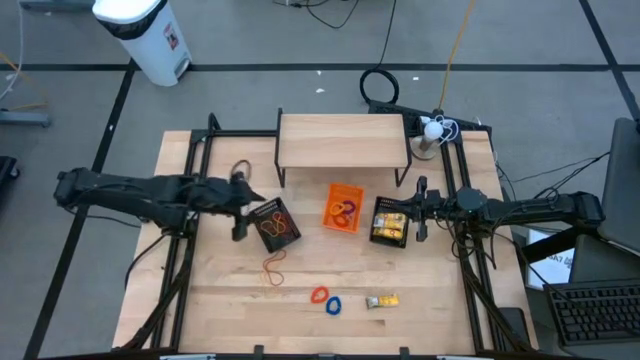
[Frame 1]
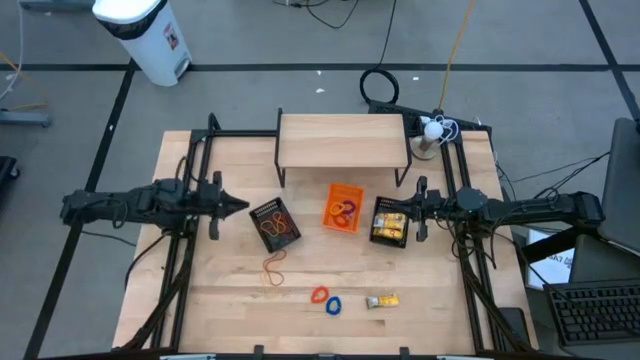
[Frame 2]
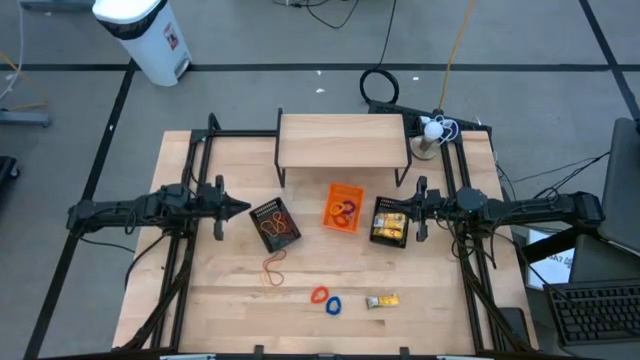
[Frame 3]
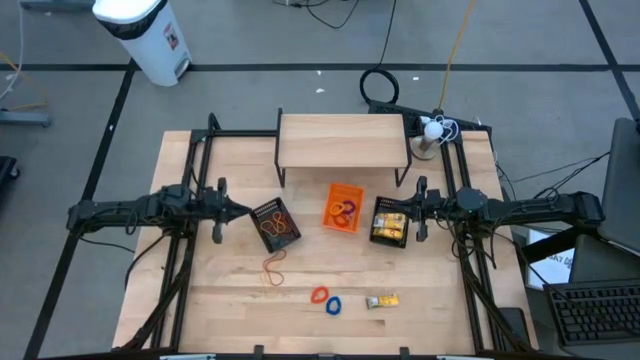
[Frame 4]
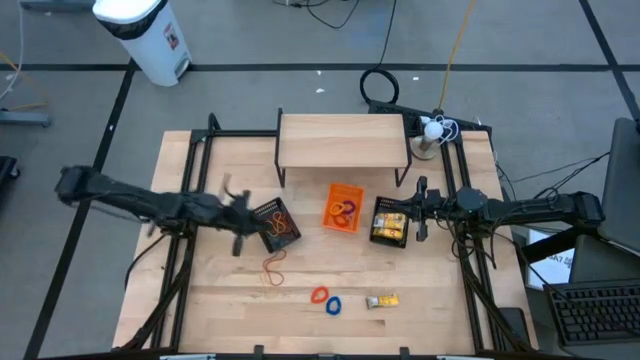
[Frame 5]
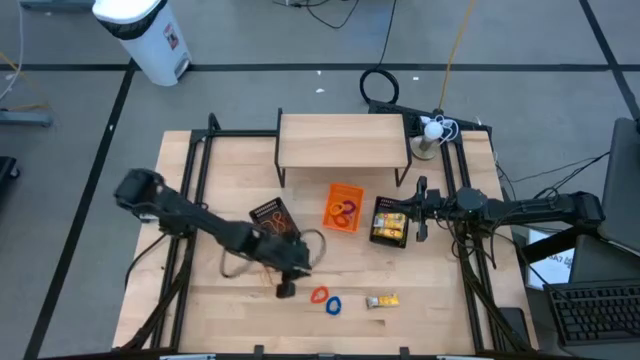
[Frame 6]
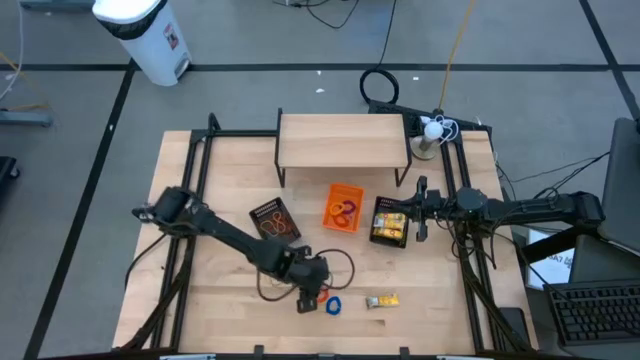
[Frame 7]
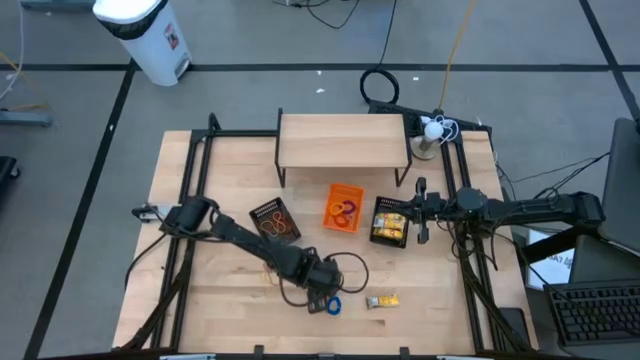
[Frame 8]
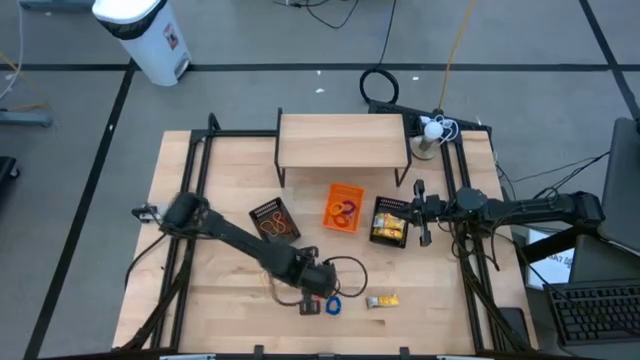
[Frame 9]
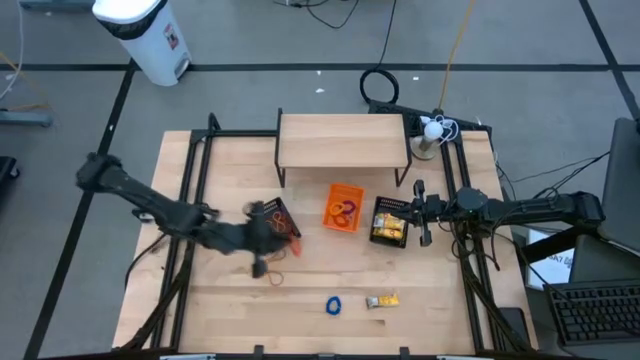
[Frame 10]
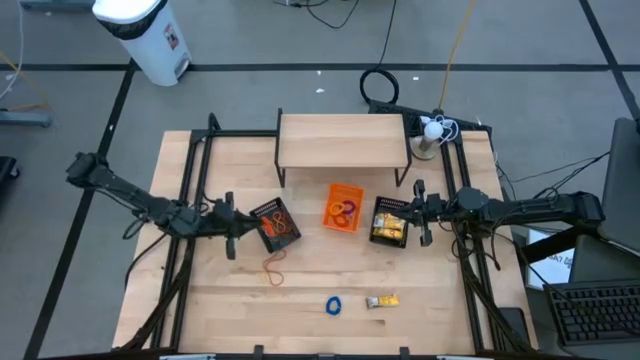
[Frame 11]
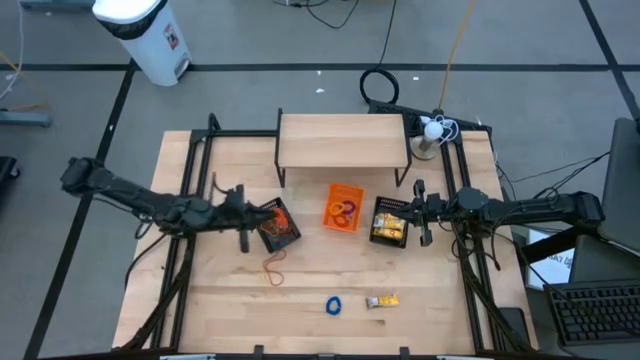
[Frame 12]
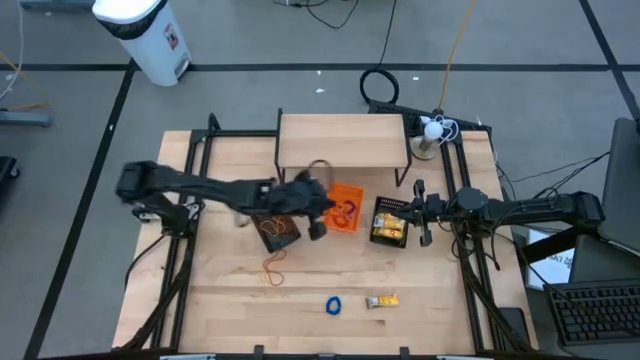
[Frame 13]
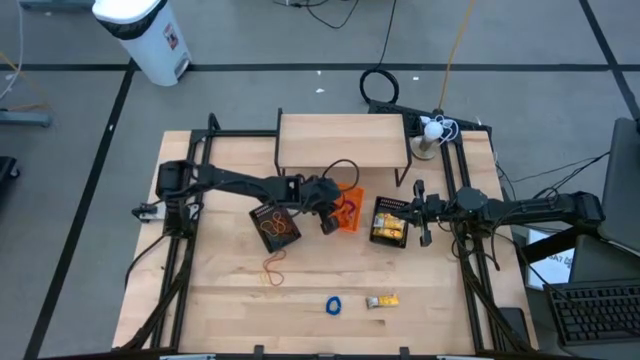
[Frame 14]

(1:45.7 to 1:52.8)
Task: Pick & Place Office Desk Supplies
Put the orange spring keychain into the orange bin

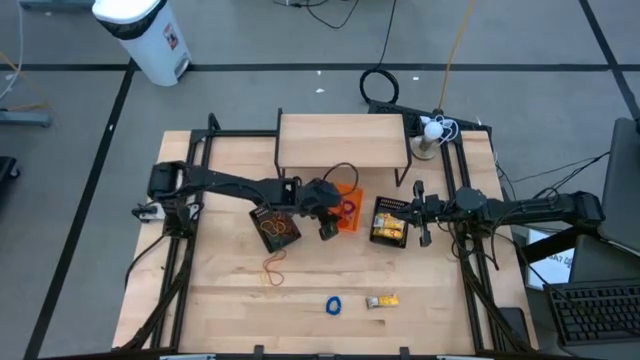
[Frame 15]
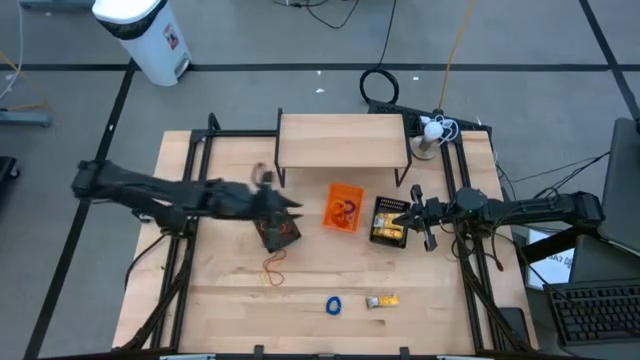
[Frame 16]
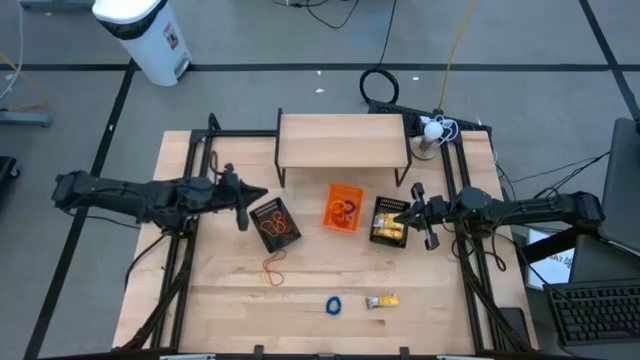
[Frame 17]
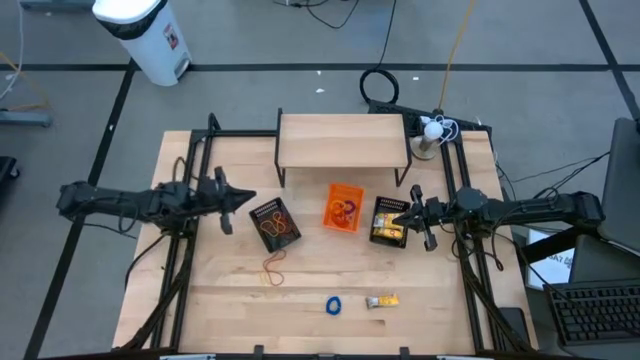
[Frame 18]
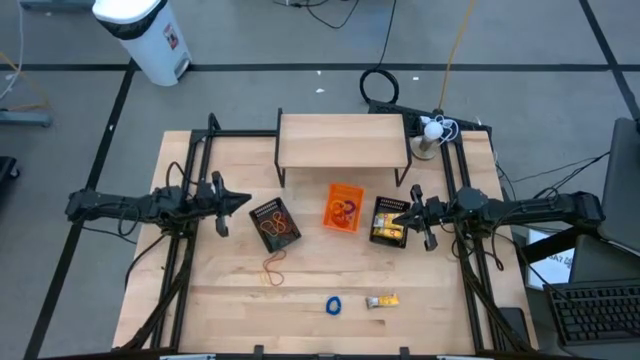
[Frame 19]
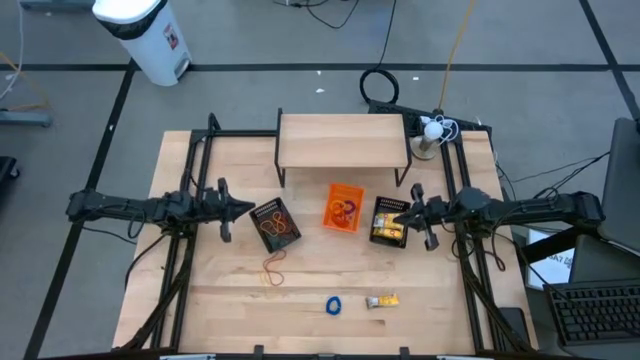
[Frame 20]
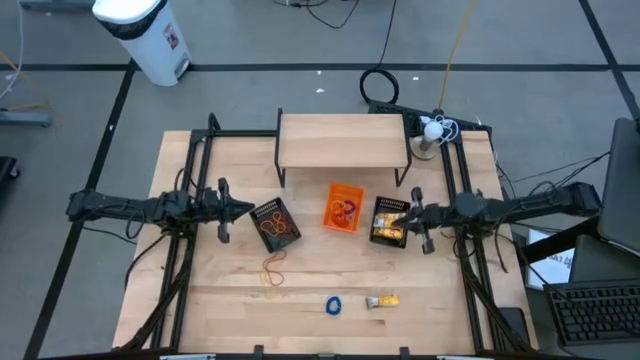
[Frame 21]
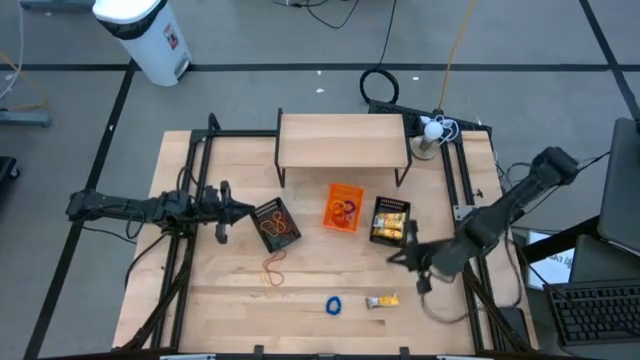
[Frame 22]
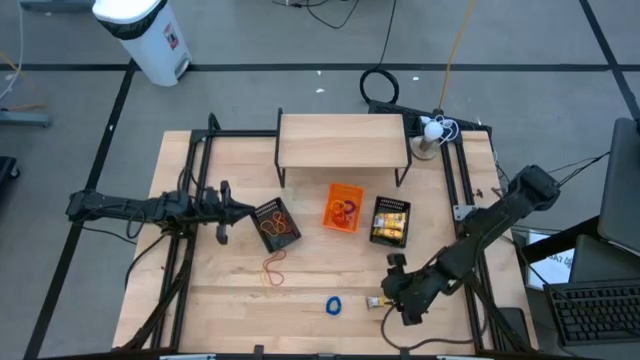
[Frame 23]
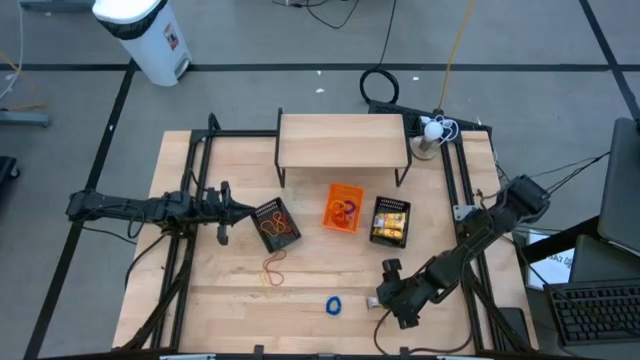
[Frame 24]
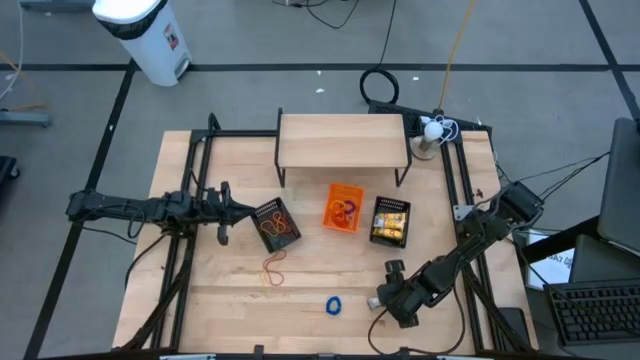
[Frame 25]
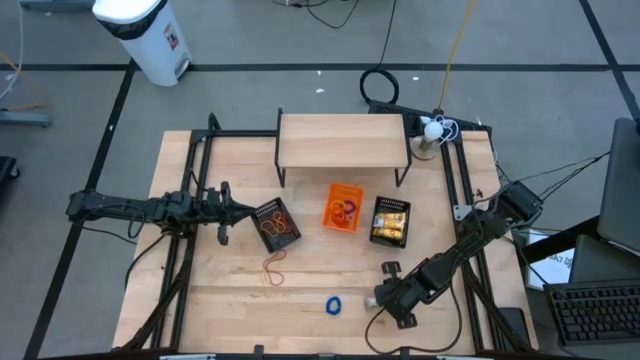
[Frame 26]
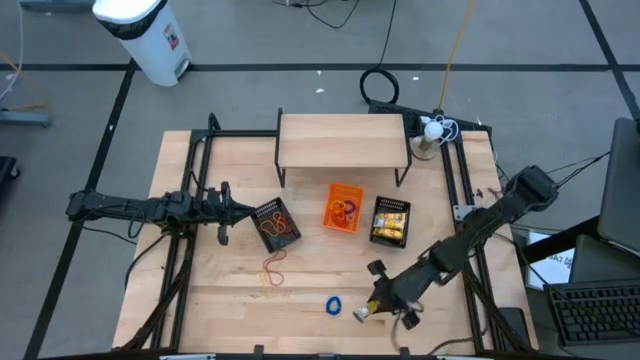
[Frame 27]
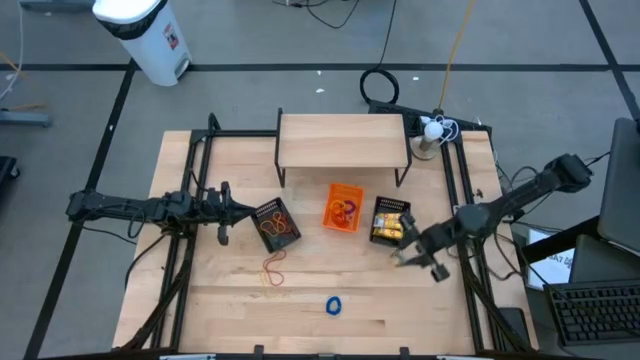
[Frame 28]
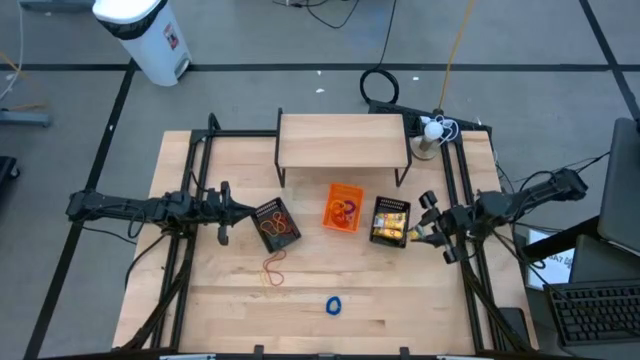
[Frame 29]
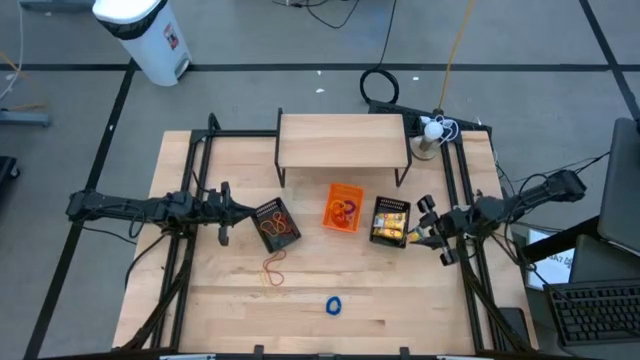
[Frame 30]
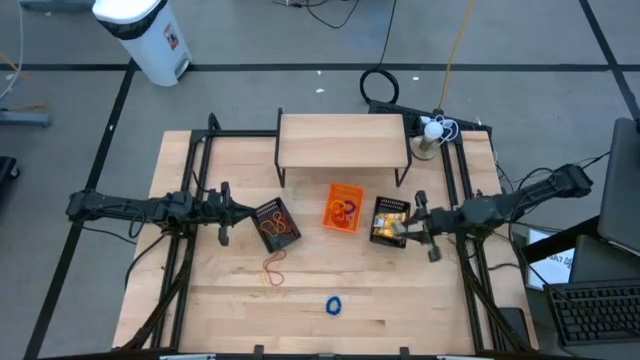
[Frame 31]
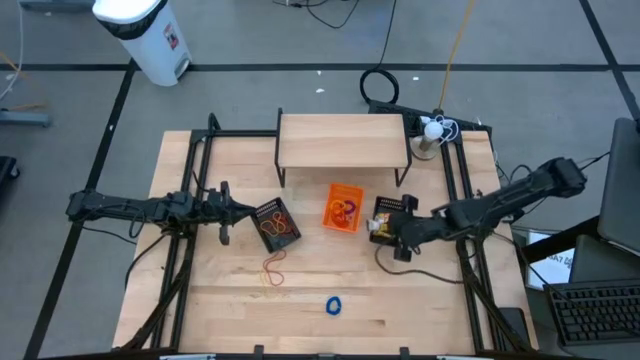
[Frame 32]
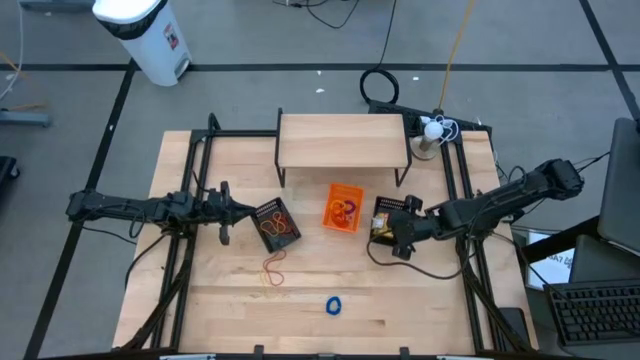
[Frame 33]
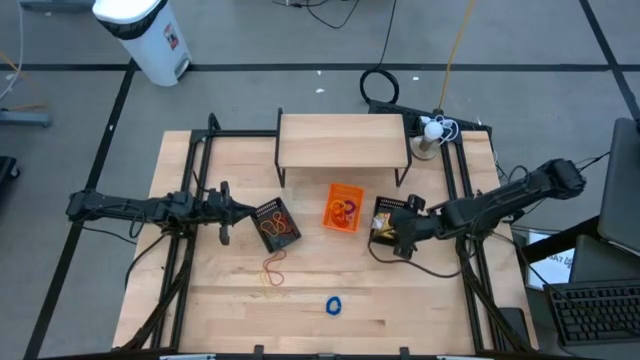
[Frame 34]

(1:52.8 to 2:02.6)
Put the crayon box into the right black bin

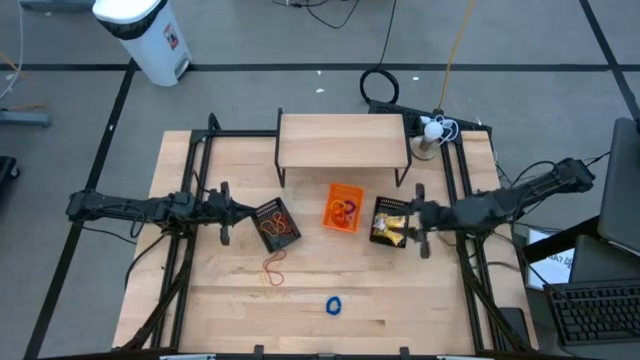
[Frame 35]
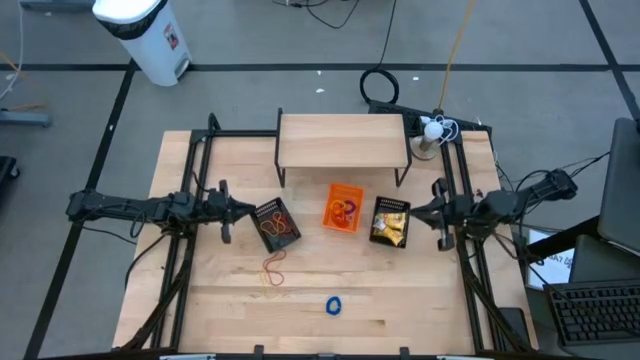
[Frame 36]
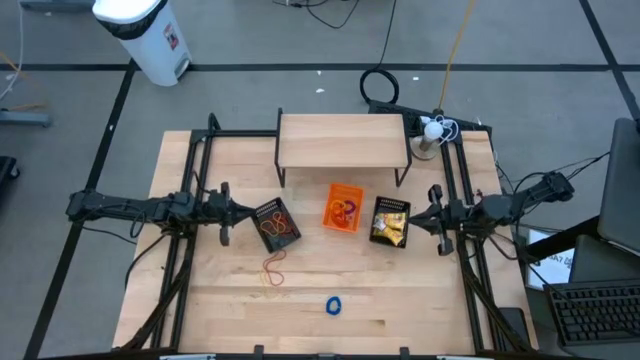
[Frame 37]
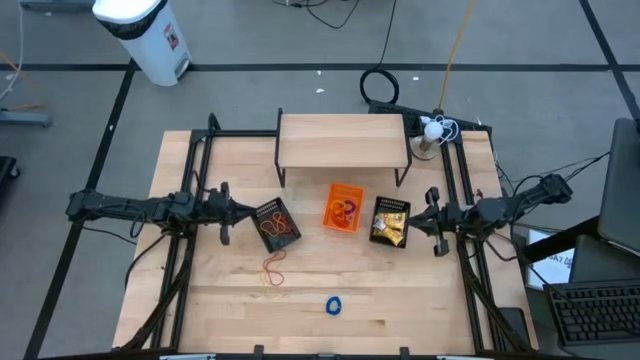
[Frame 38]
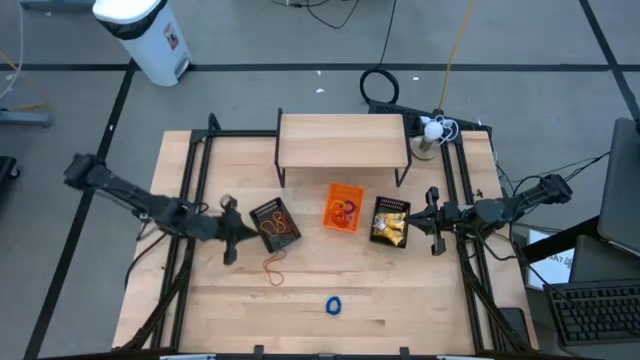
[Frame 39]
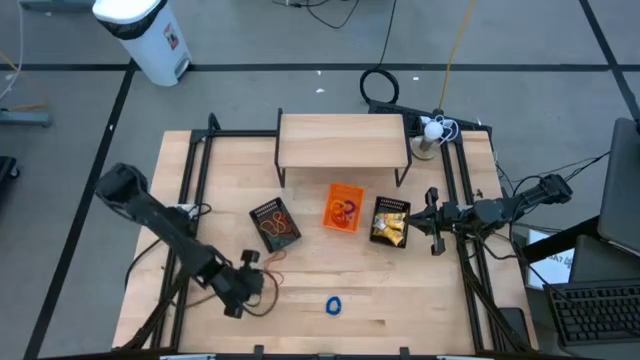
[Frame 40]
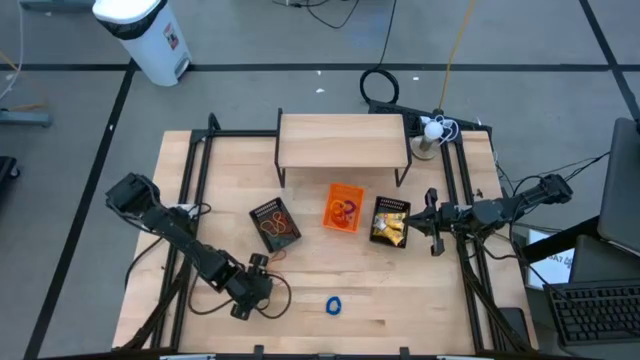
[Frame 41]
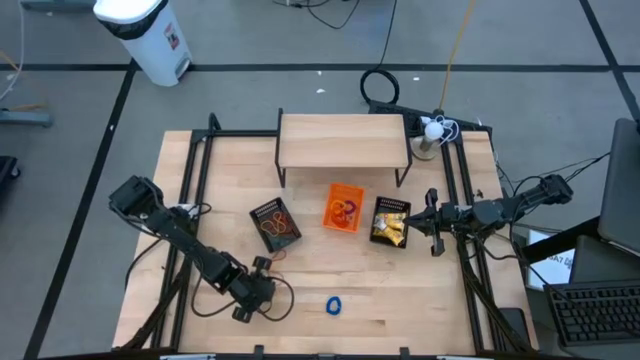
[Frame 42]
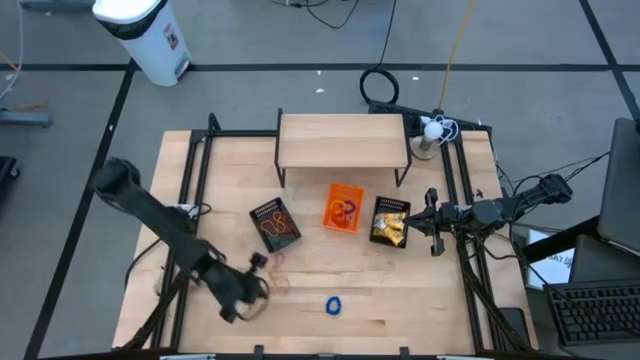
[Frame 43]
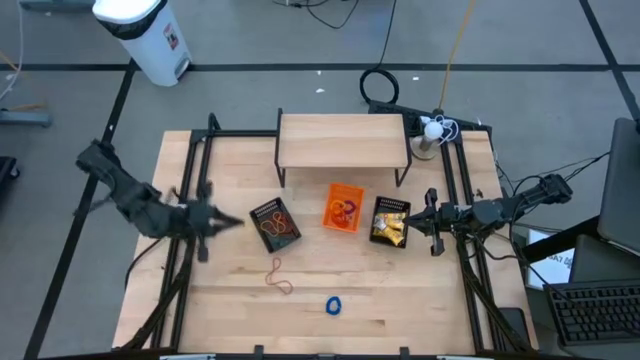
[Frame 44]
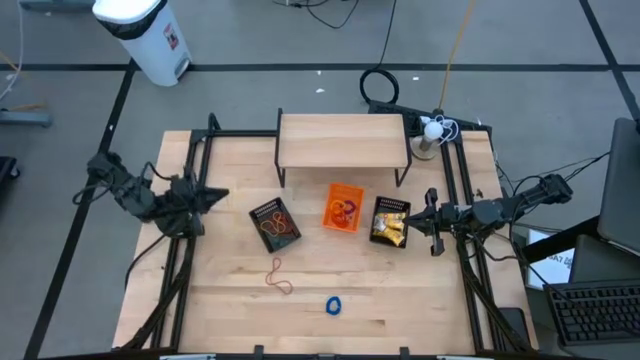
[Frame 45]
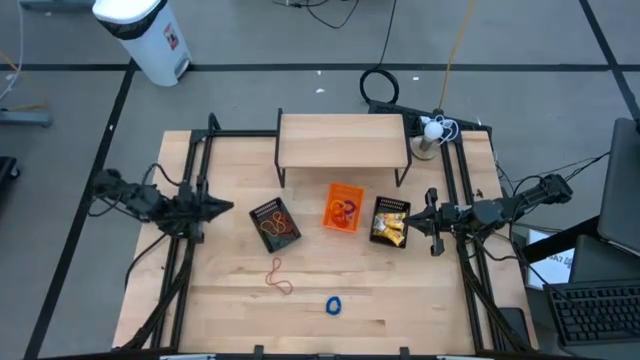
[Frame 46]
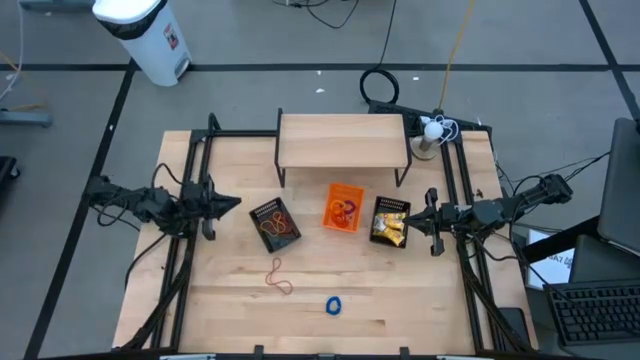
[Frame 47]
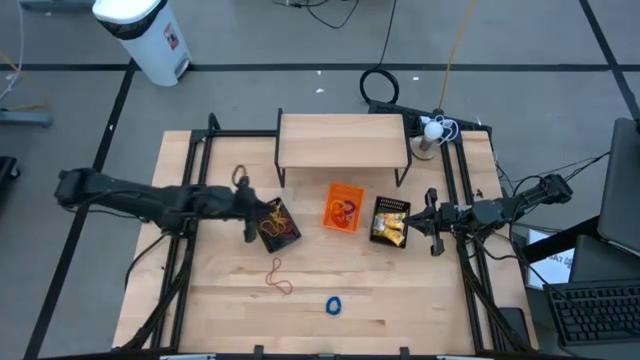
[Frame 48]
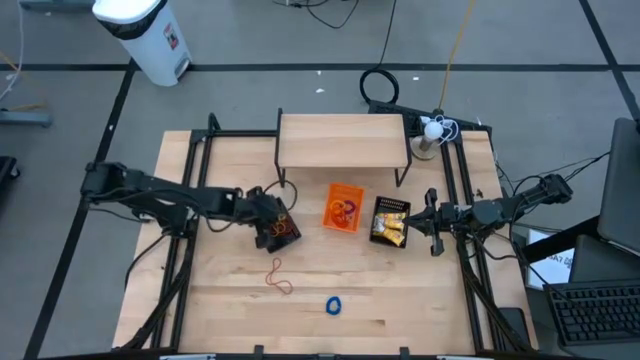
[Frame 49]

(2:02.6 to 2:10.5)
Put the yellow rubber band into the left black bin
